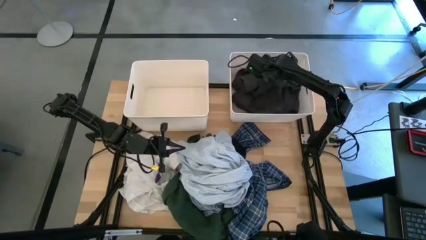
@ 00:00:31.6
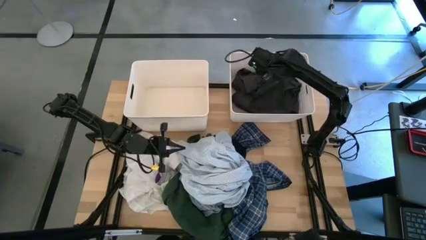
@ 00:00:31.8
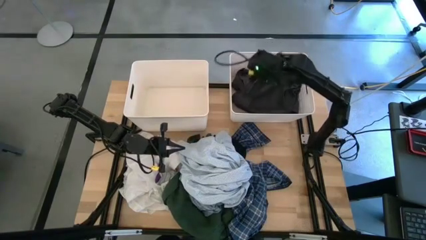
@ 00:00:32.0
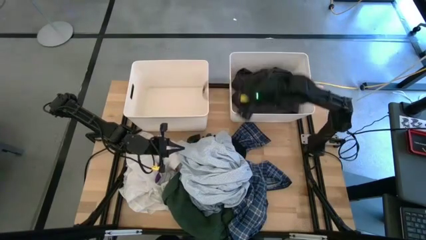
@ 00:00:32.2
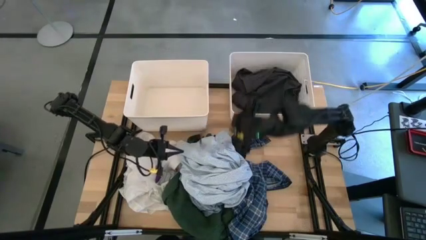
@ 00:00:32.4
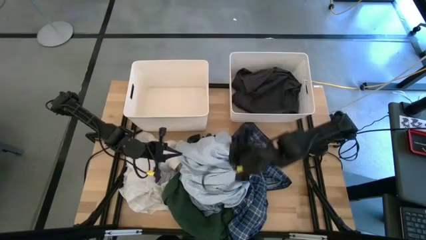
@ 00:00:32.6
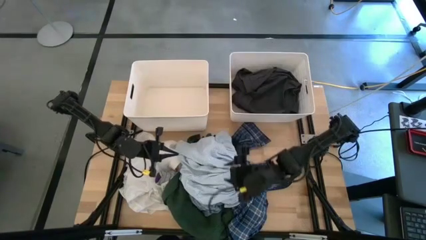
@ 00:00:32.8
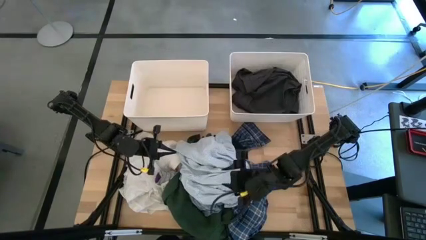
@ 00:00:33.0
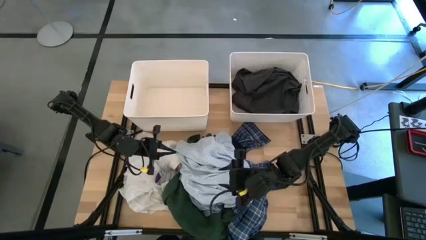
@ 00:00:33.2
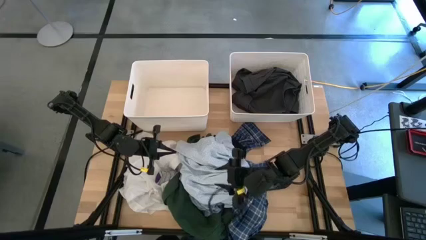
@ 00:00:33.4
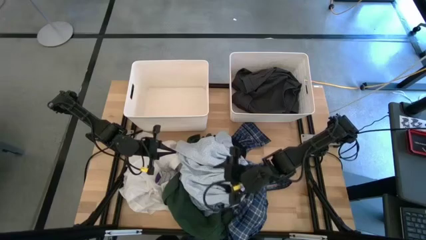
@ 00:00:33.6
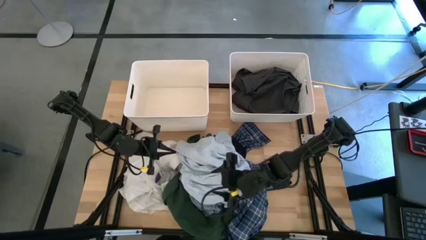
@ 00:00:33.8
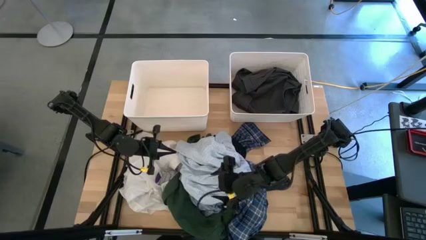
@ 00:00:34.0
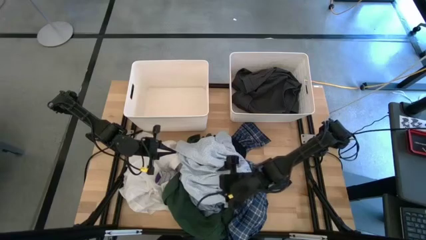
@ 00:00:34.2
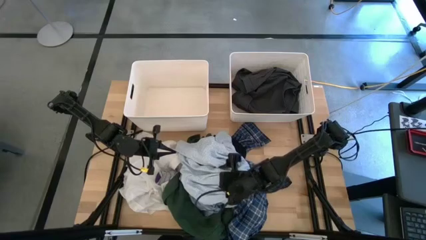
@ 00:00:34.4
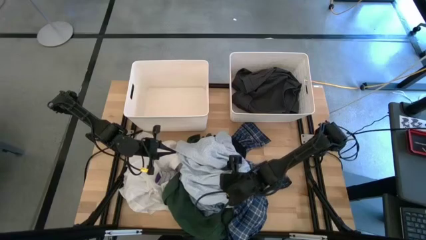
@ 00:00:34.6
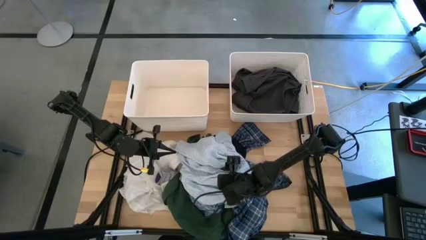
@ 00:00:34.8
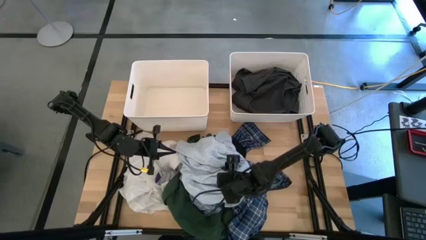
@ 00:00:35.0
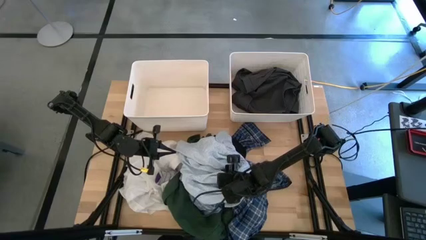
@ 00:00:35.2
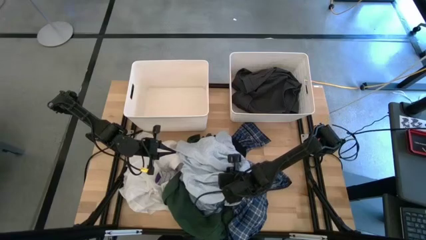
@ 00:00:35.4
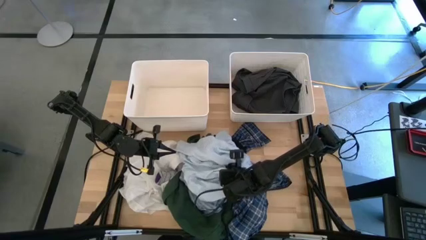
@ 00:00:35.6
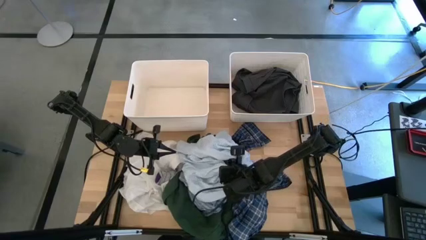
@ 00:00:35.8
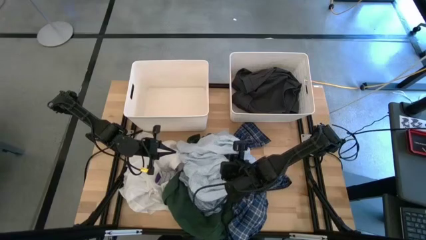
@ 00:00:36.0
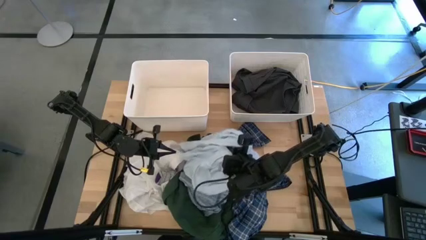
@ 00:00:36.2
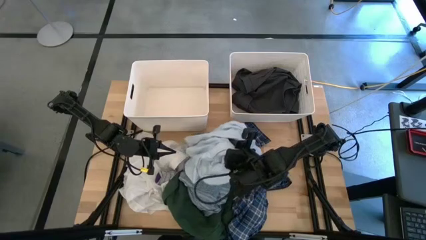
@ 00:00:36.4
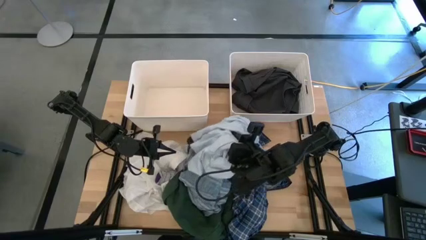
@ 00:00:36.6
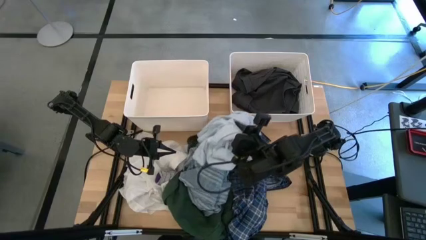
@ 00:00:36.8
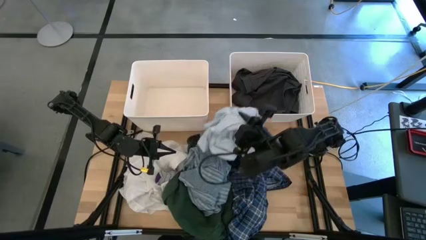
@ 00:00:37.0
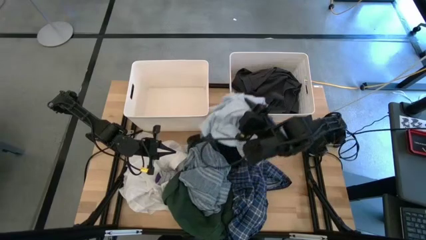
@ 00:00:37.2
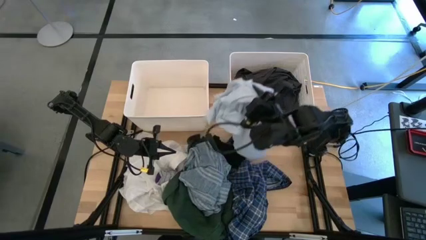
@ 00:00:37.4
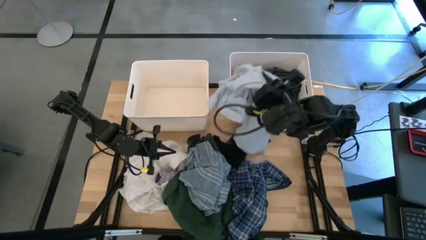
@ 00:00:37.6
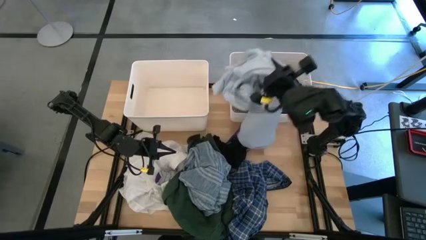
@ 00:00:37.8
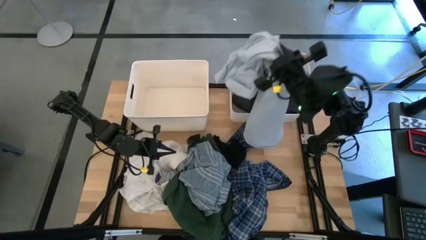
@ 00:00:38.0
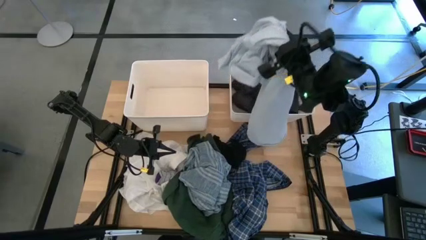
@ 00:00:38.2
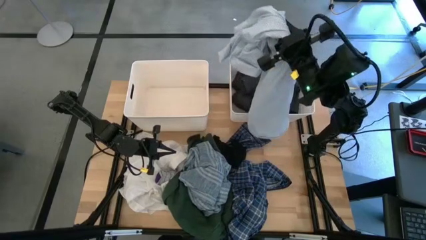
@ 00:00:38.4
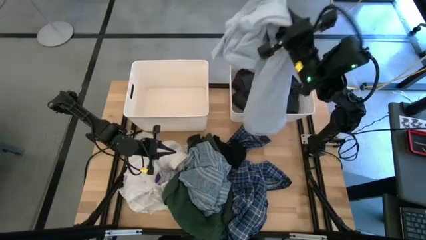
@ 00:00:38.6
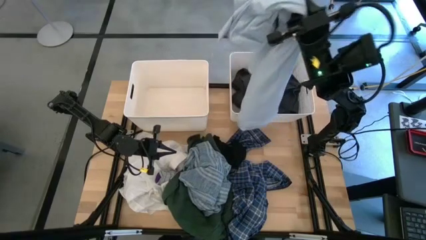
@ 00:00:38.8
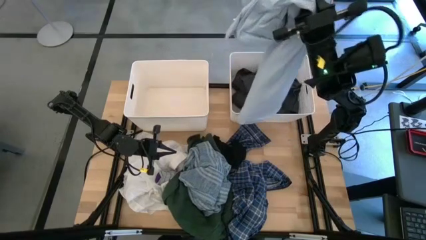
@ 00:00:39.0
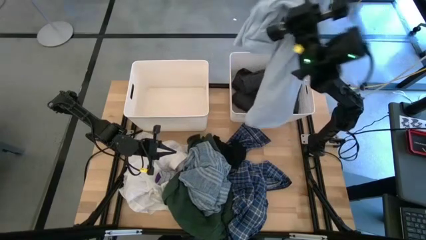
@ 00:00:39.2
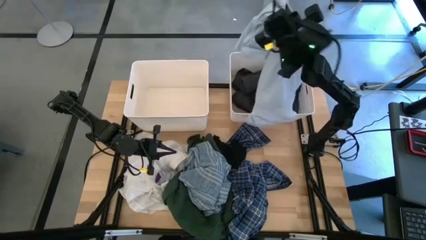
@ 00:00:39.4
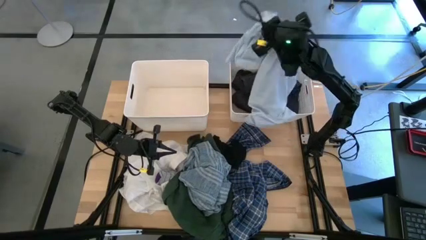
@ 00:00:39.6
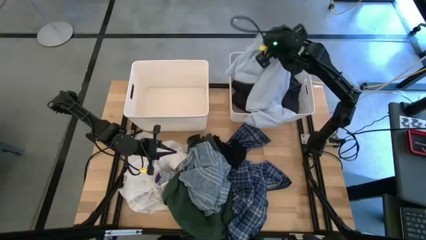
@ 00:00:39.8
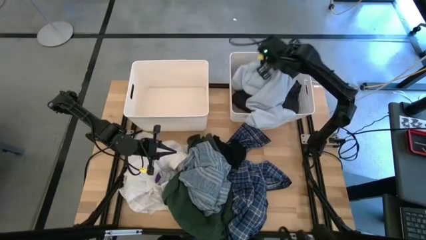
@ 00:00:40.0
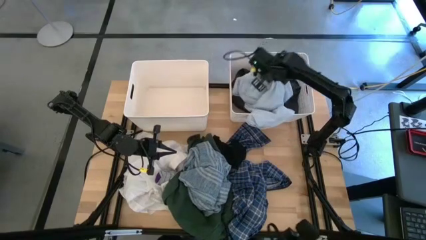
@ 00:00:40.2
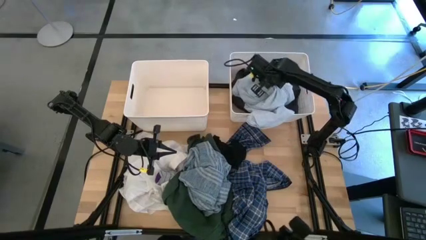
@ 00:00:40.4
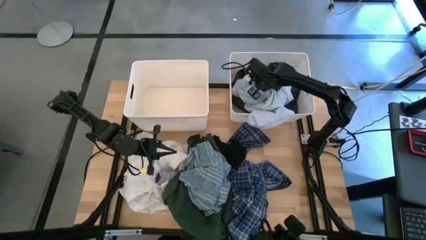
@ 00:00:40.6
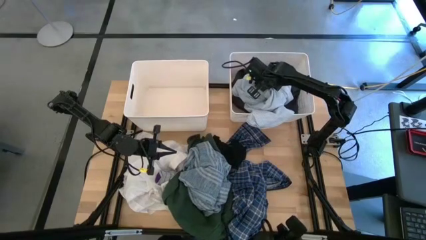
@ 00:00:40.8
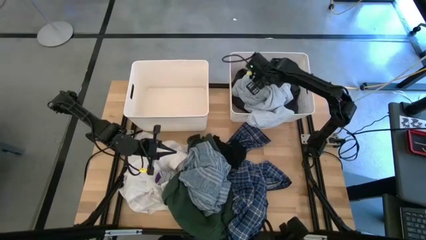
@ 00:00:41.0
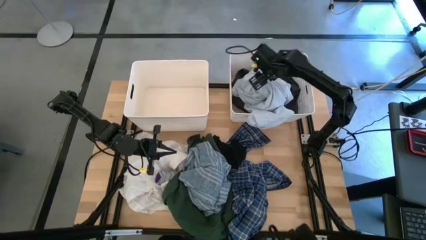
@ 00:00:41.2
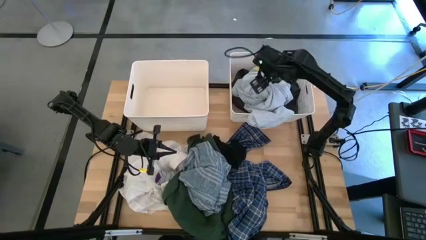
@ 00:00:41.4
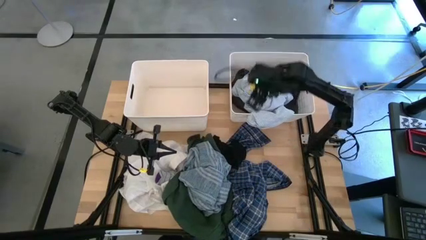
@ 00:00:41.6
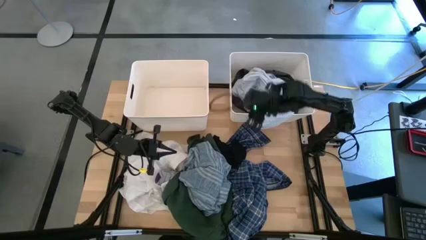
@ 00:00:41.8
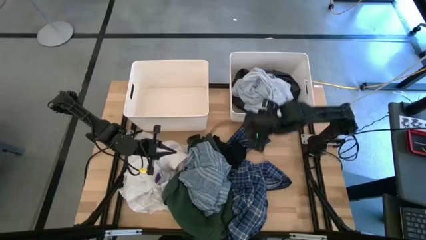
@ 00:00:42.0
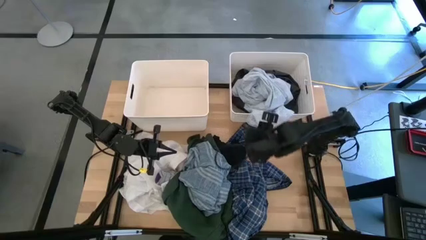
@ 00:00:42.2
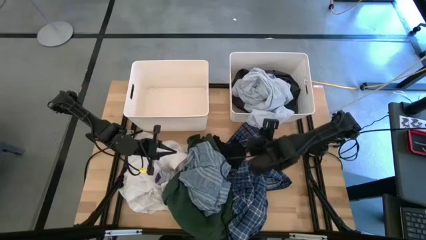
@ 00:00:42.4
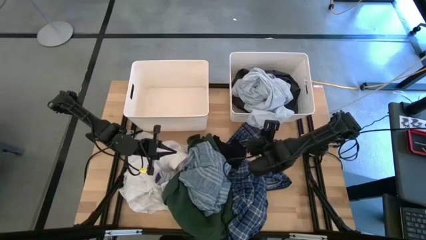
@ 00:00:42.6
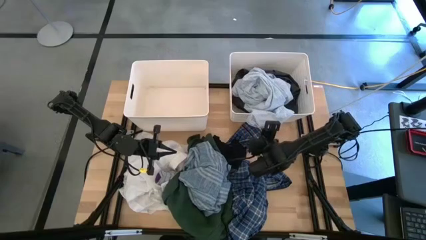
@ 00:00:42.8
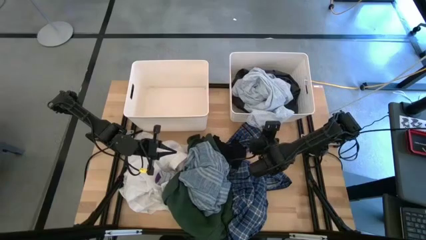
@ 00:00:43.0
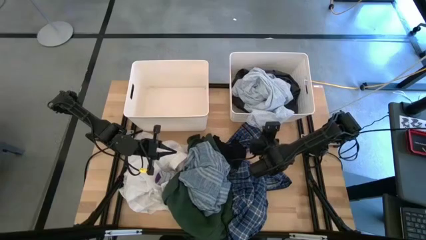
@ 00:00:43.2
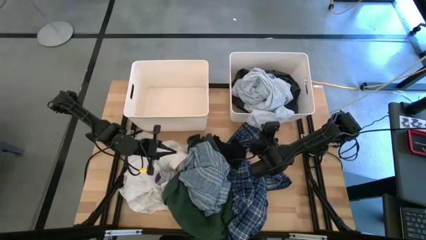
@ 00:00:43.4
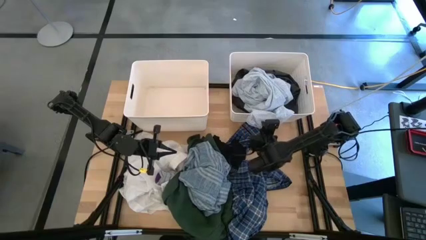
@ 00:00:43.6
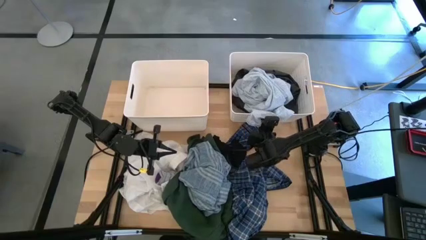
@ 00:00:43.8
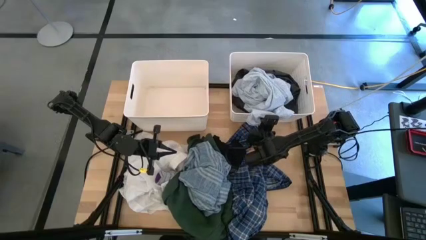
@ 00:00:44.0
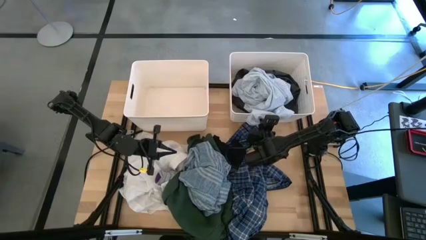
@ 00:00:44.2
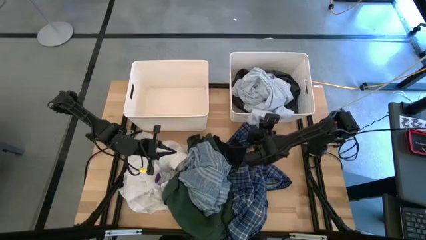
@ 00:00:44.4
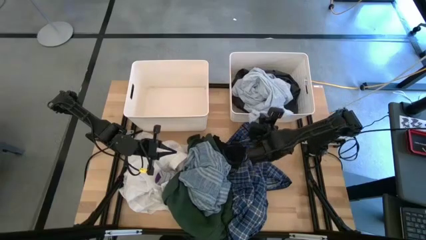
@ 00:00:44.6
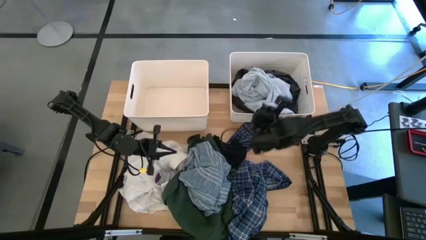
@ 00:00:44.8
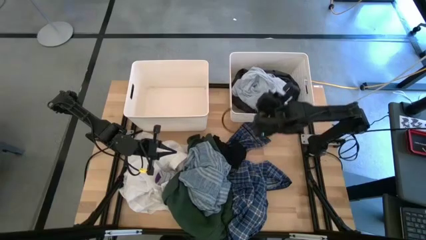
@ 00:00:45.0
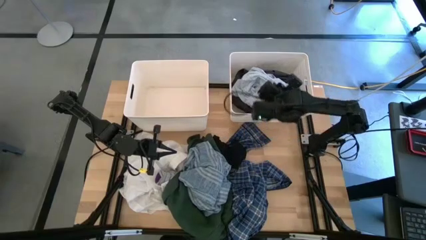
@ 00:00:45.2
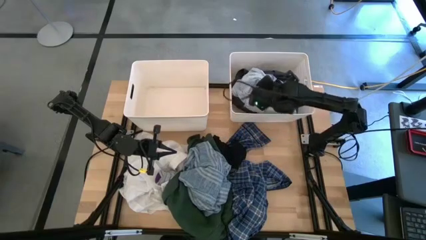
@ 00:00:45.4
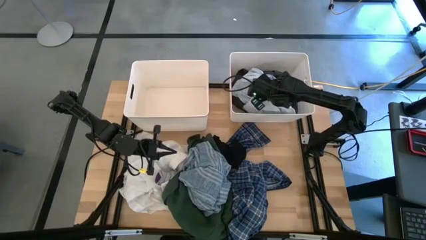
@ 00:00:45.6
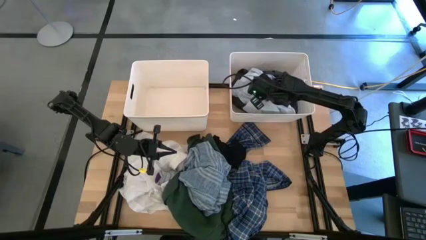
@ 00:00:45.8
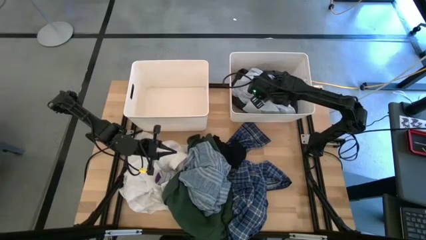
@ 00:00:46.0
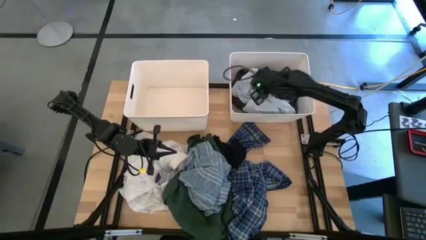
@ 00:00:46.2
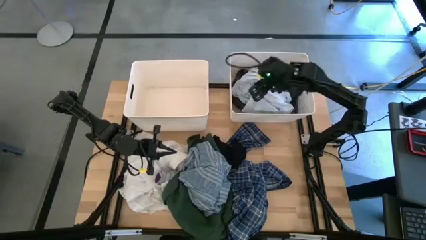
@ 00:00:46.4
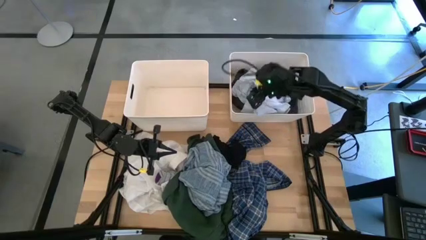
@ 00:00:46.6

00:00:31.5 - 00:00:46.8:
Task: Sort clothes
Put the white blue patterned pyjama into the right white bin
